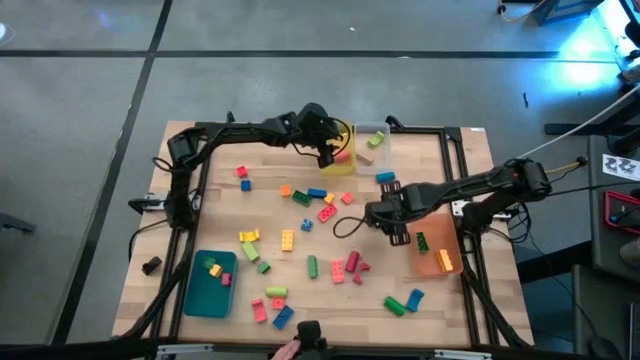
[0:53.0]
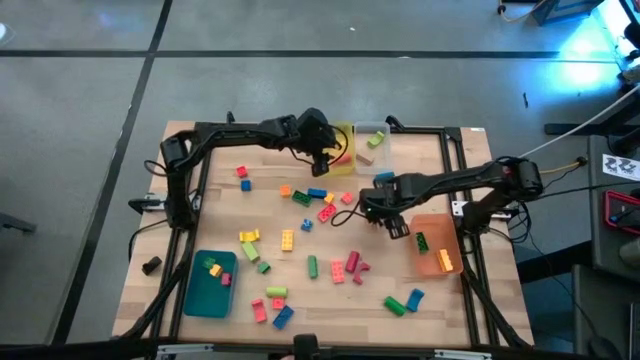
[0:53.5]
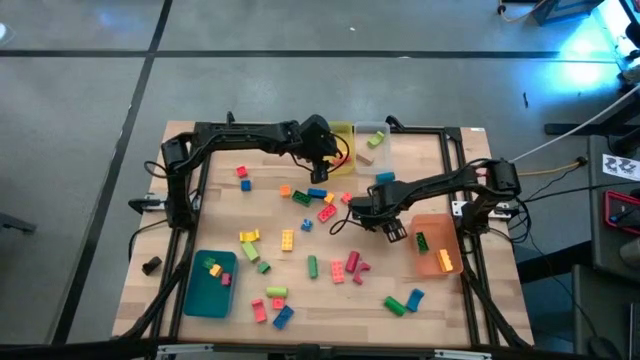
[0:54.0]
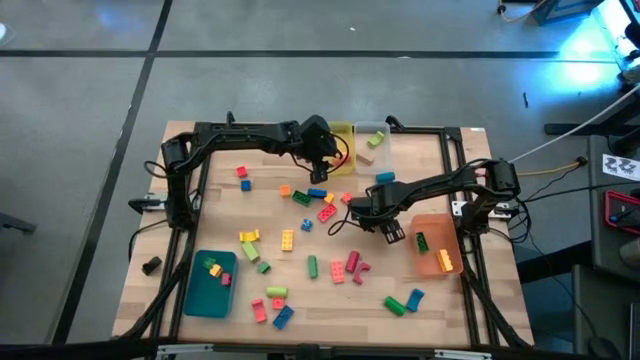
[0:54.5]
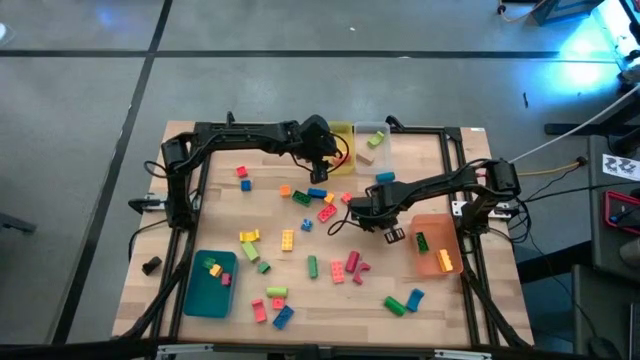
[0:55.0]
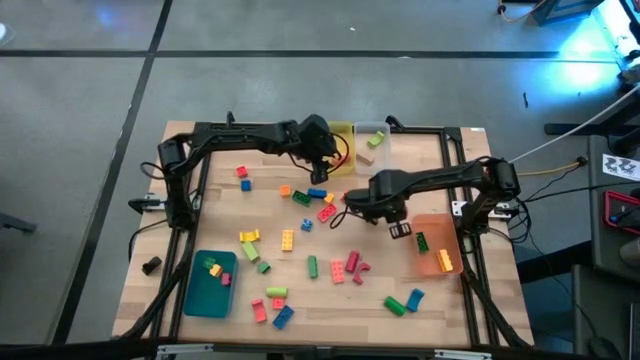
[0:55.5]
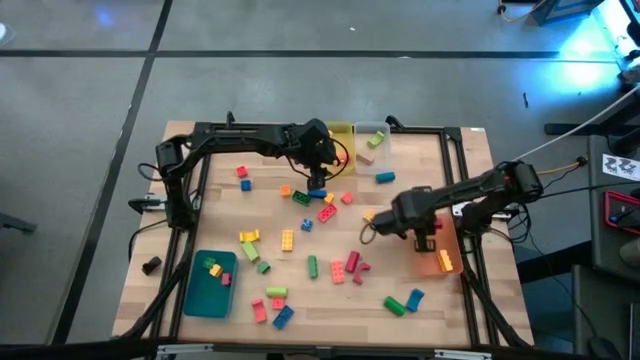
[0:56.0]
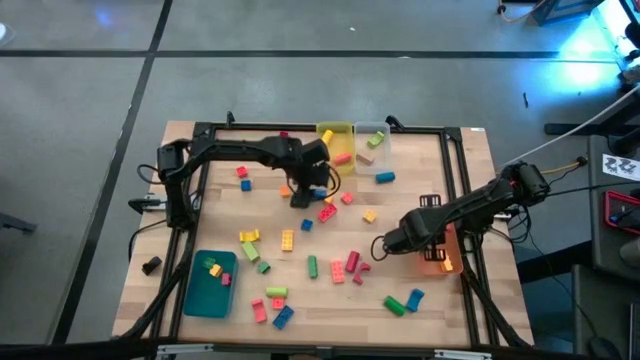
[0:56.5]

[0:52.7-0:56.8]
Task: Sort blocks by size
Put the red rectangular game piece into the orange bin

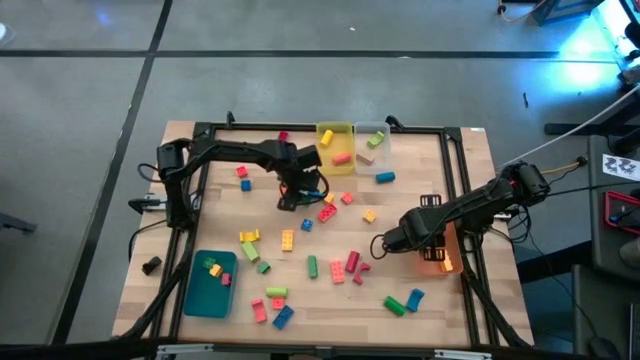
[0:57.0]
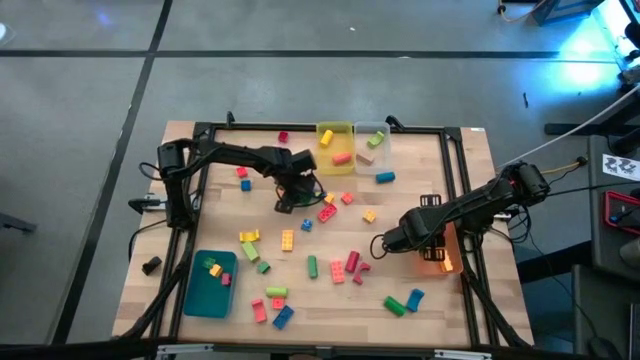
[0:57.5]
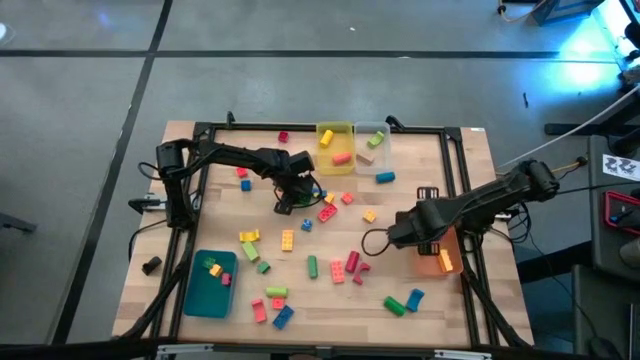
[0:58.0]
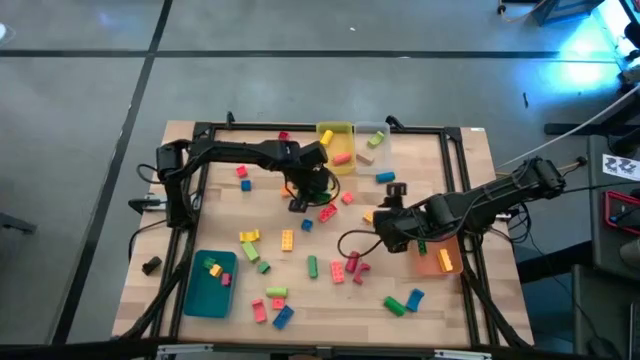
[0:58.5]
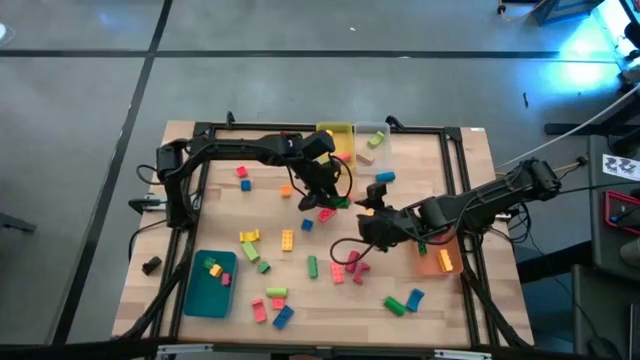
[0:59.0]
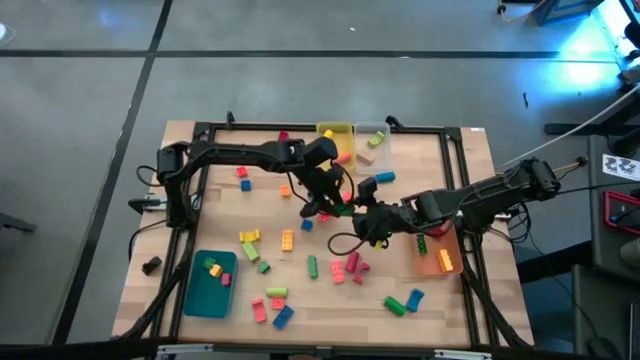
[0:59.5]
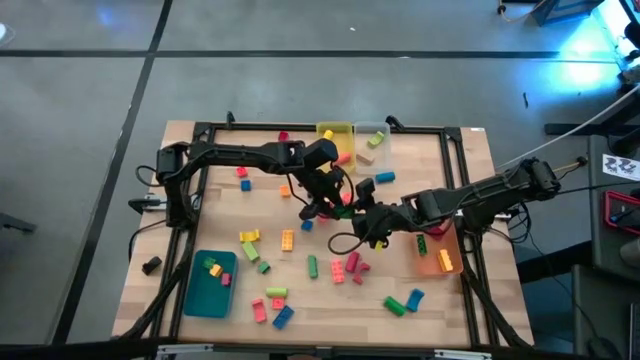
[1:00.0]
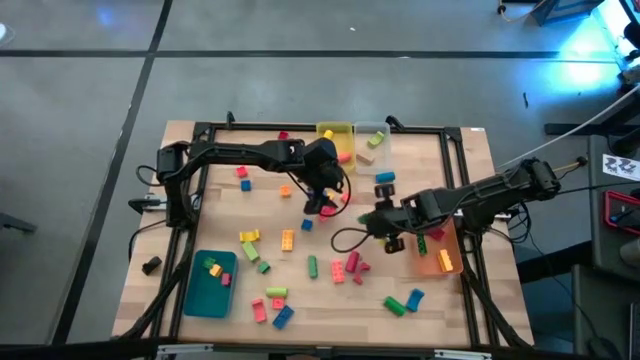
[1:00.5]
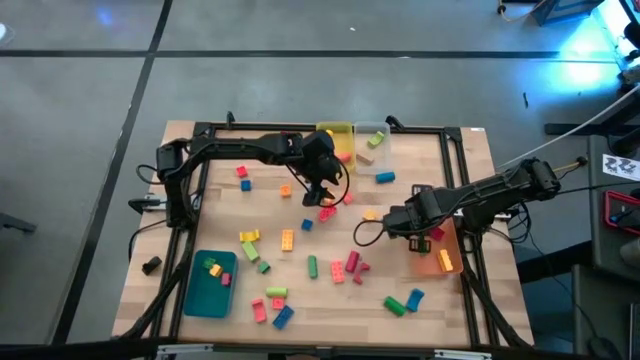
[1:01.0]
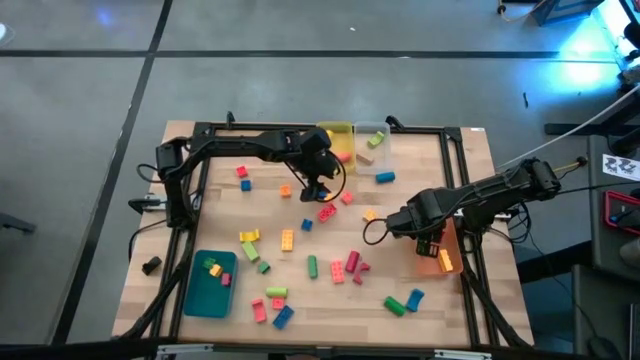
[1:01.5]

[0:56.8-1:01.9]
Put the green rectangular game piece into the orange bin

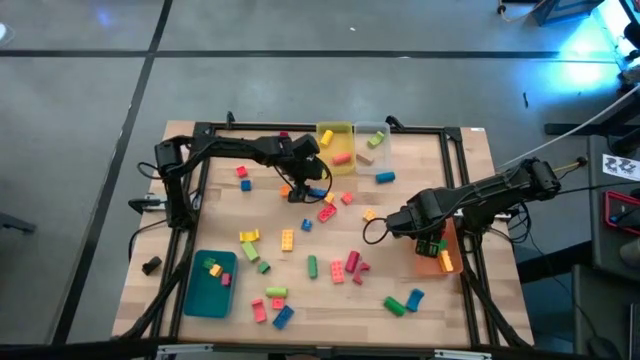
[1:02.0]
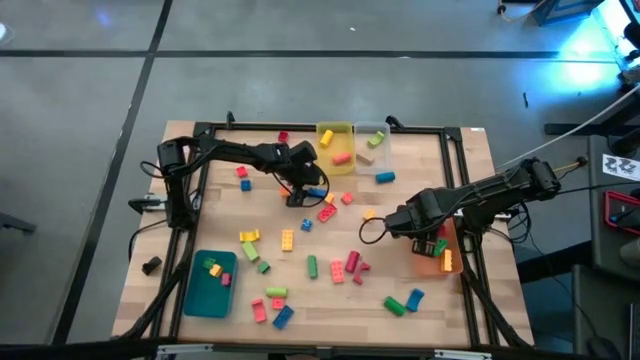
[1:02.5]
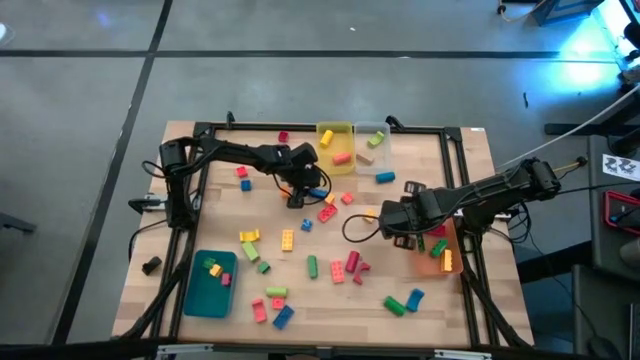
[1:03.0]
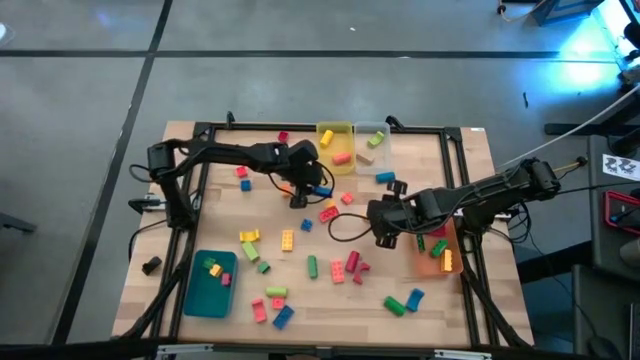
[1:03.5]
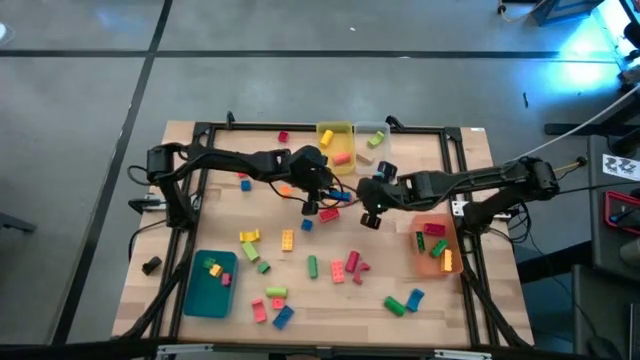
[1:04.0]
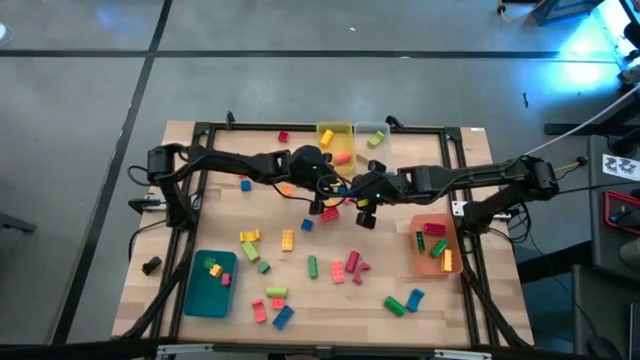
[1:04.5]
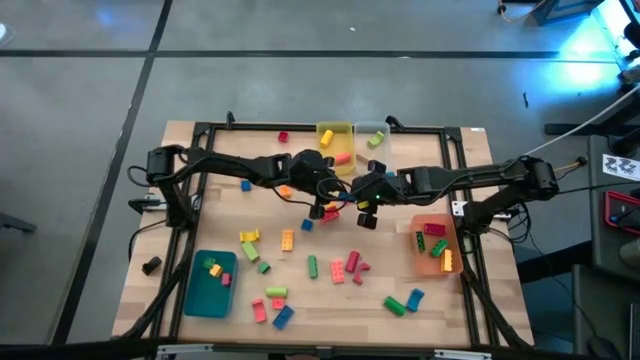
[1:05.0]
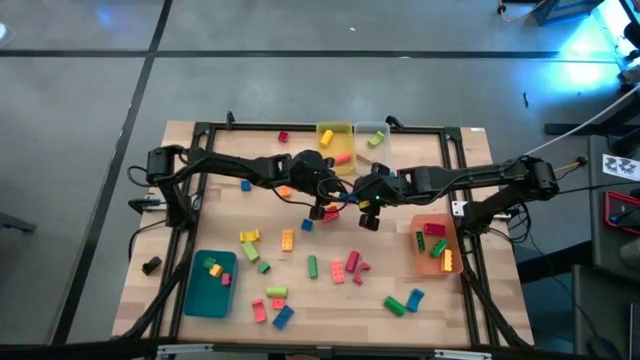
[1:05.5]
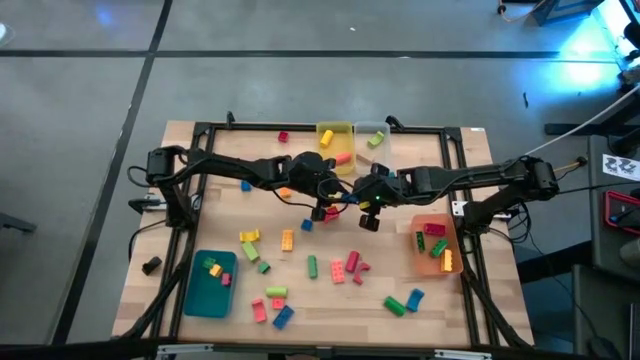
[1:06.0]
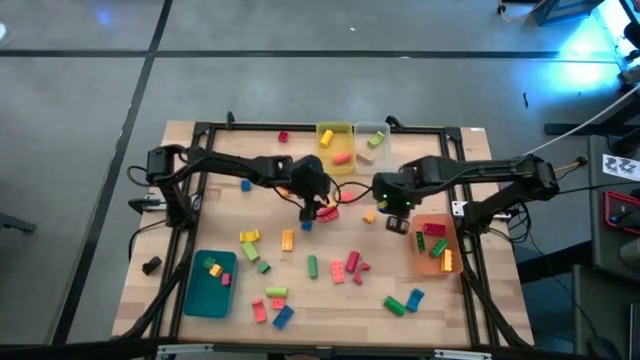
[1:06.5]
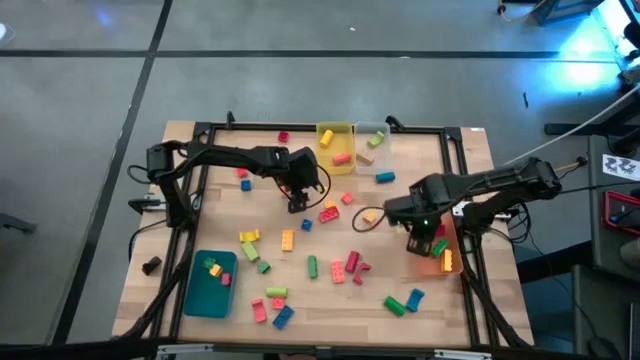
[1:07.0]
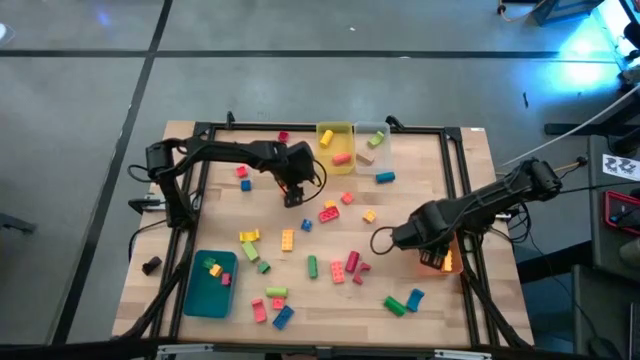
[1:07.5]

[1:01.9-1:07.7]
Put the blue rectangular game piece into the orange bin

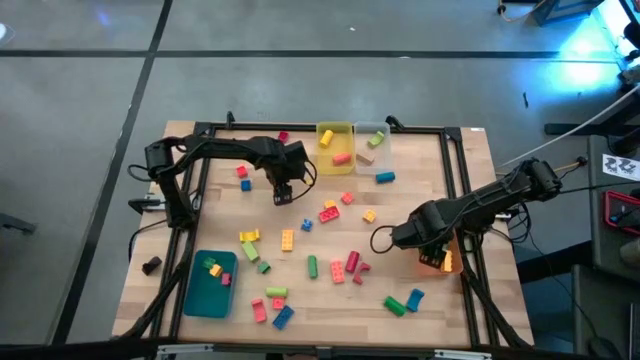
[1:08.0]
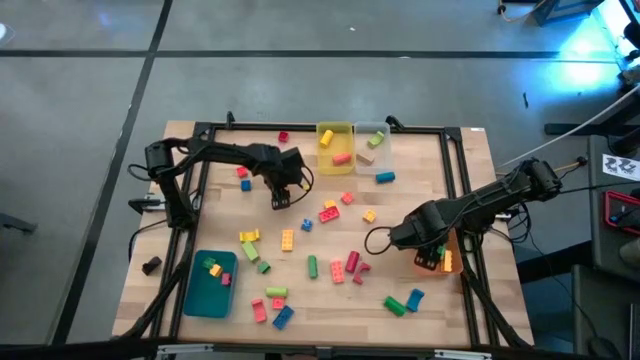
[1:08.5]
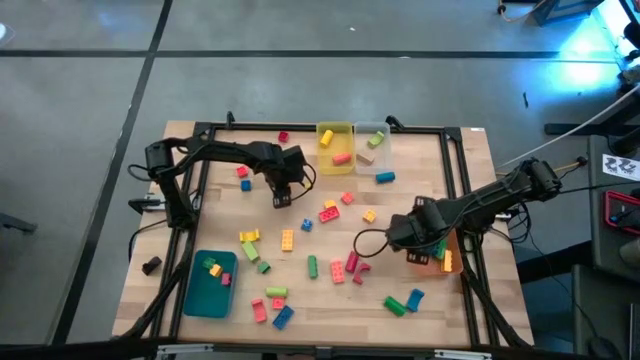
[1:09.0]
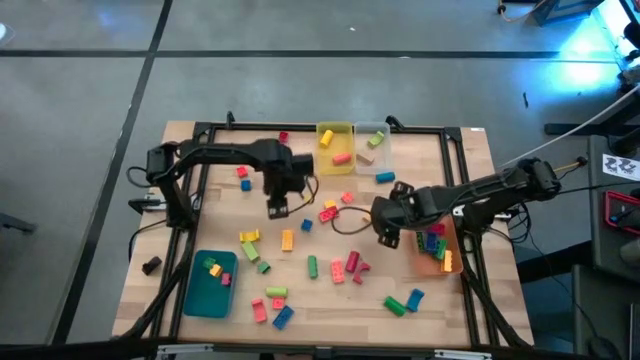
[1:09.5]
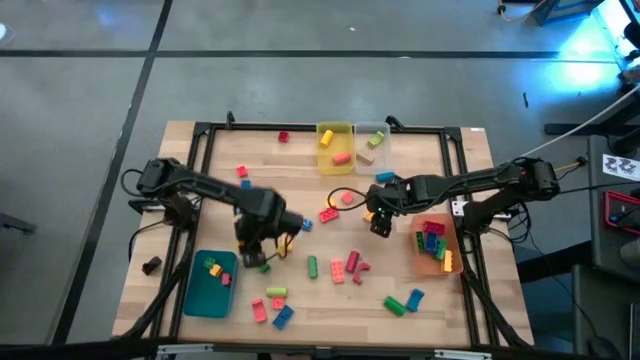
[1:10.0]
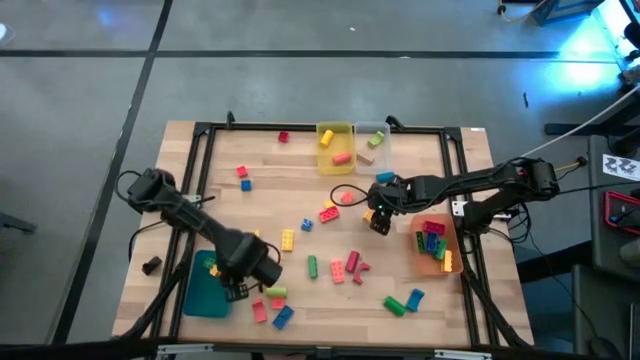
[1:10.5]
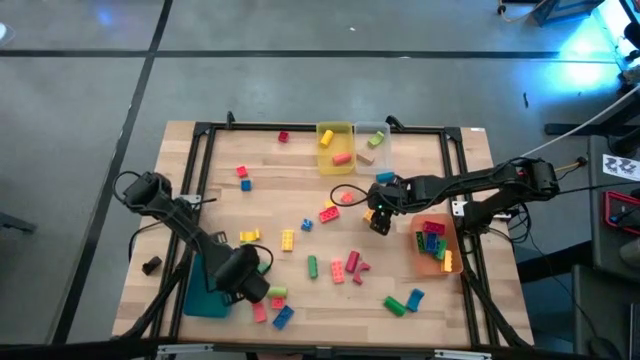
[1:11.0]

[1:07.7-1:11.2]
Put the yellow square game piece into the blue bin

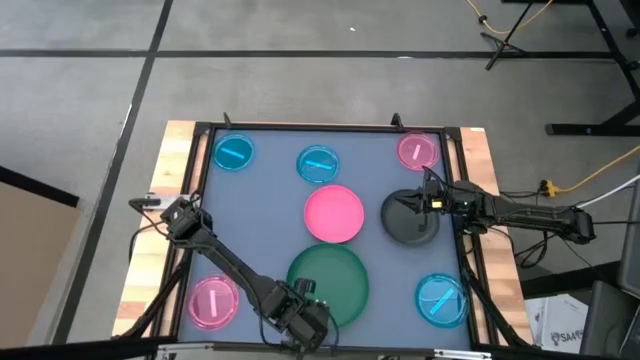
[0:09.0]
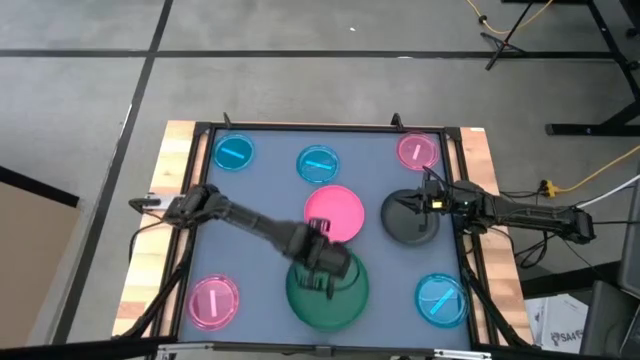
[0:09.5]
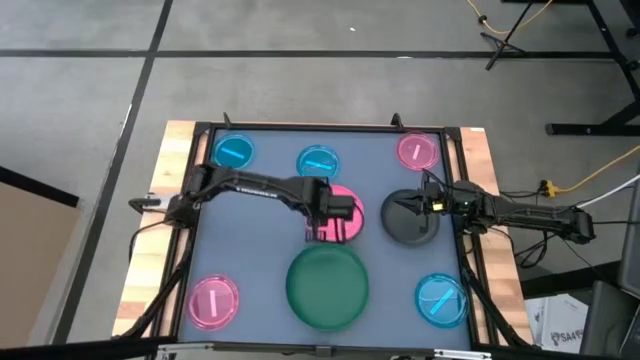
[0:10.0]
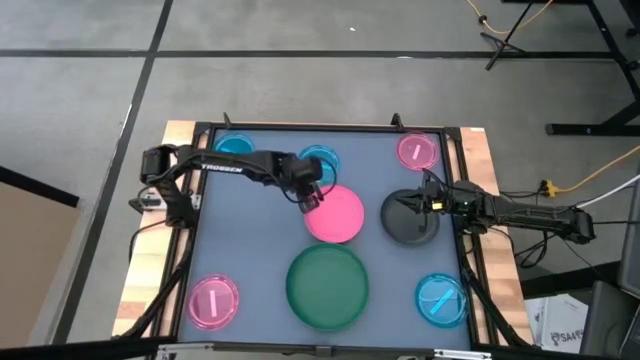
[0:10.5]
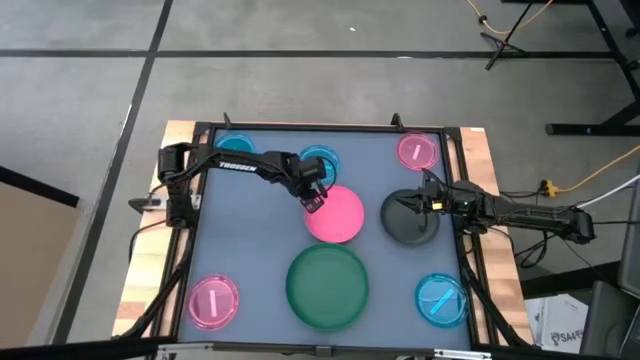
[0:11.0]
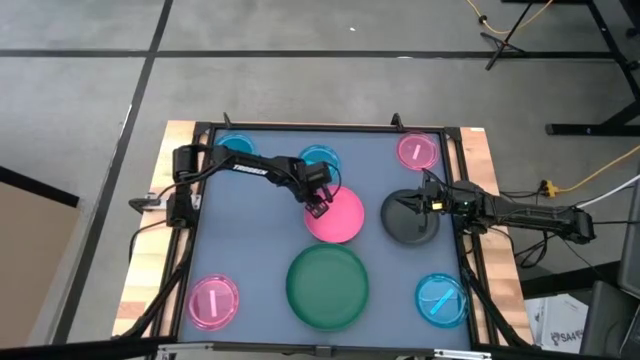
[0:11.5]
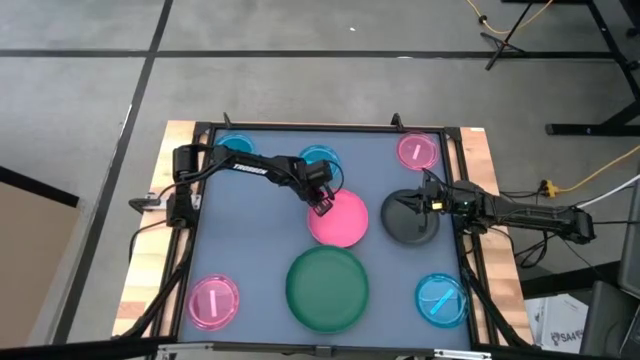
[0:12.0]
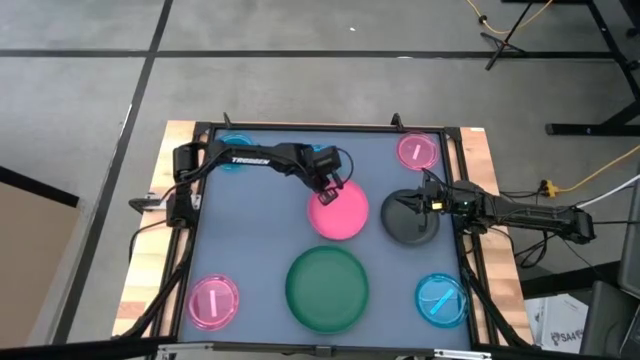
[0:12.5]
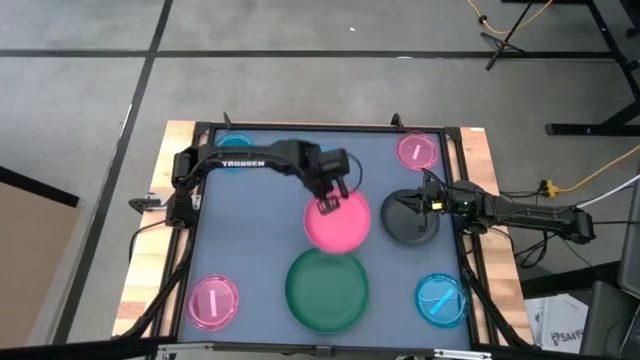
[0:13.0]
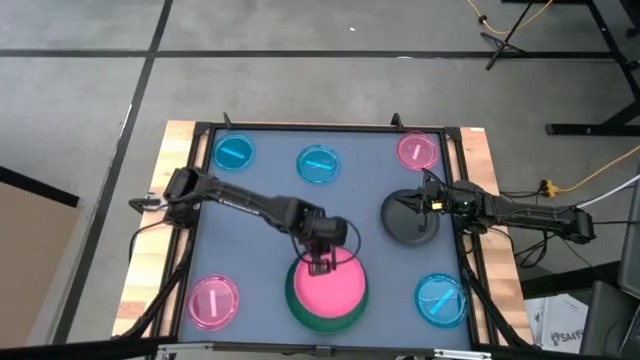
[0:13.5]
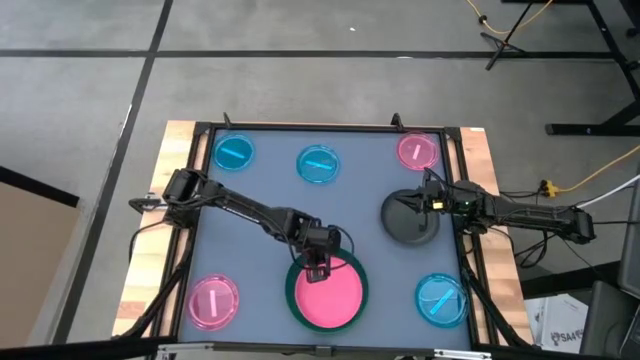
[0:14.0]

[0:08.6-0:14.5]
Task: Stack plastic plates
Stack the middle pink plate on top of the green plate
